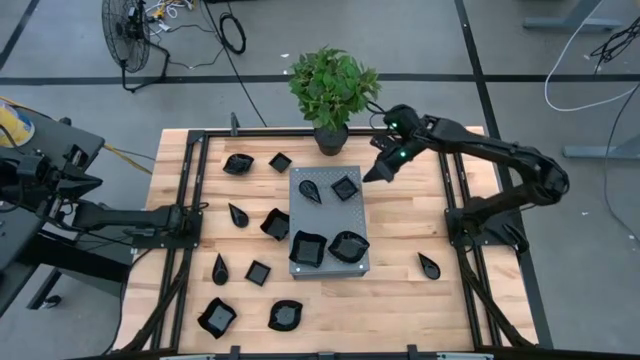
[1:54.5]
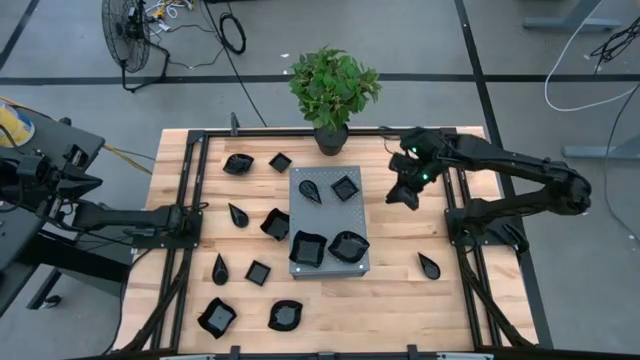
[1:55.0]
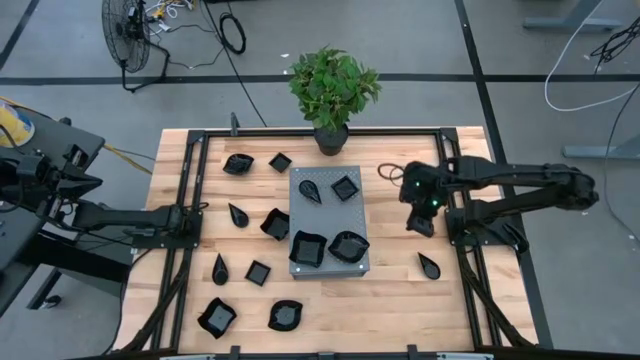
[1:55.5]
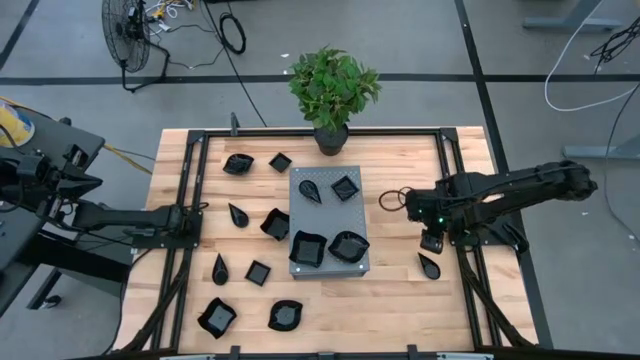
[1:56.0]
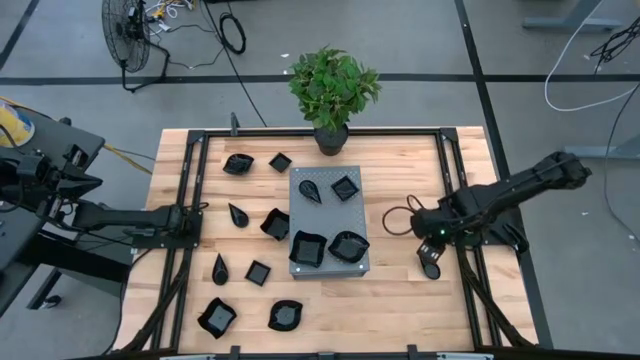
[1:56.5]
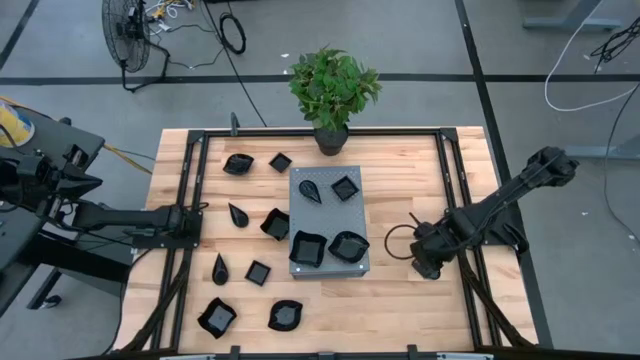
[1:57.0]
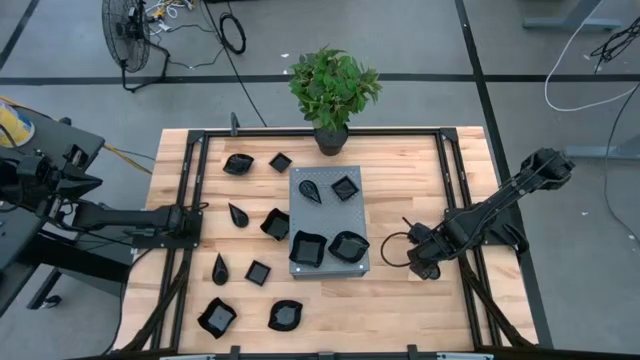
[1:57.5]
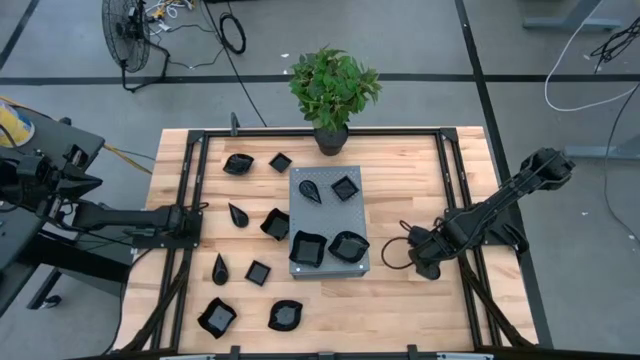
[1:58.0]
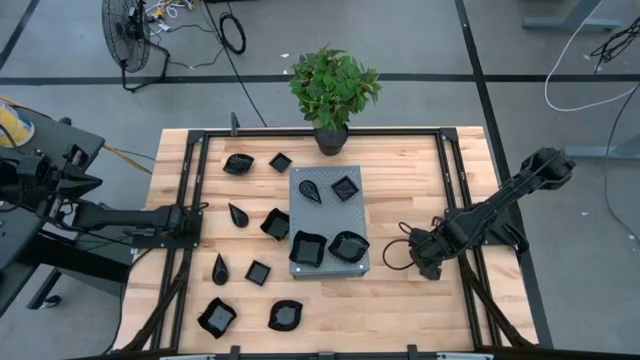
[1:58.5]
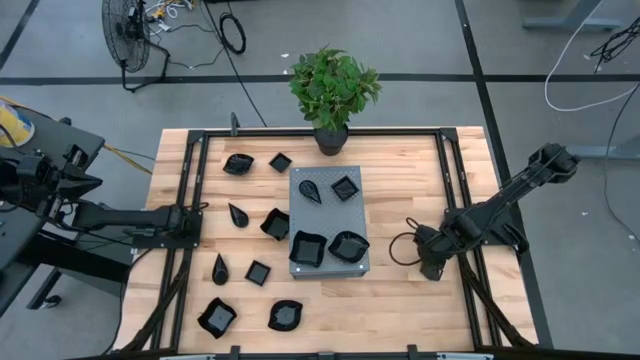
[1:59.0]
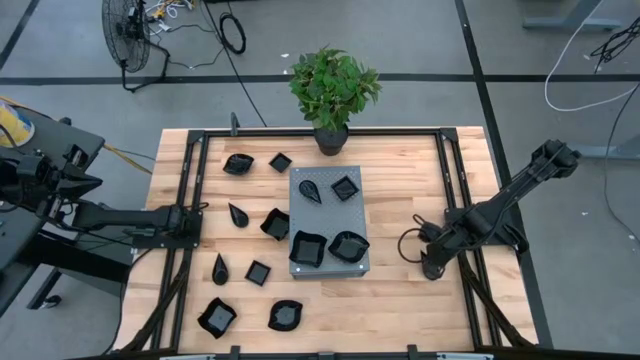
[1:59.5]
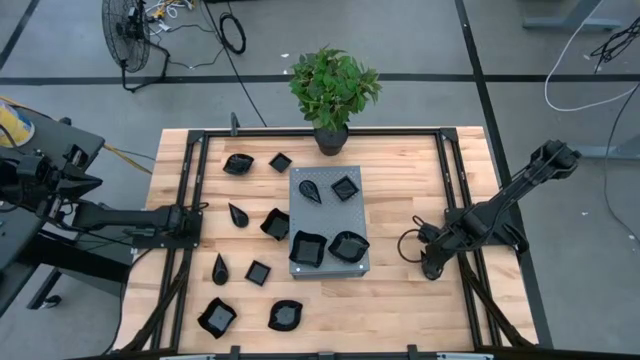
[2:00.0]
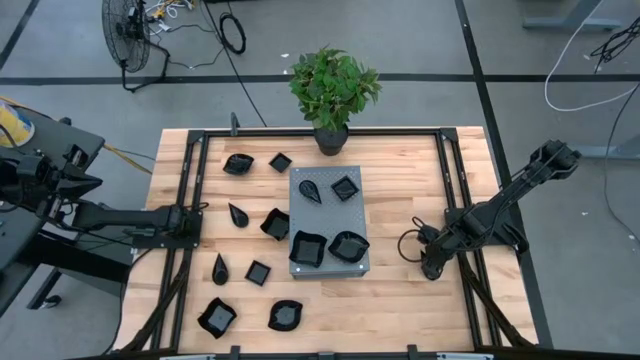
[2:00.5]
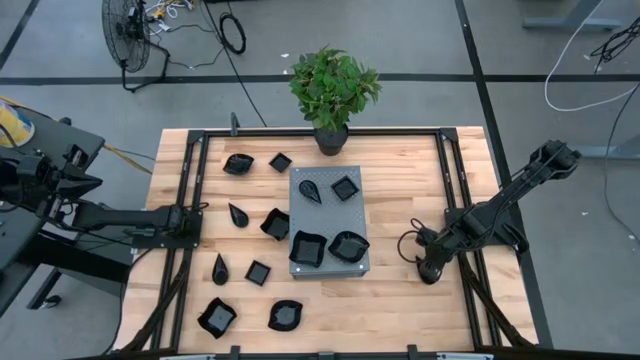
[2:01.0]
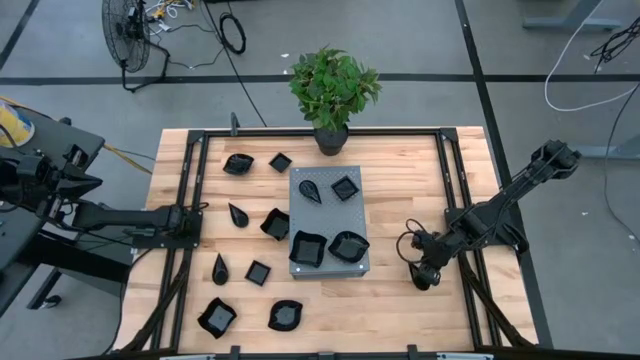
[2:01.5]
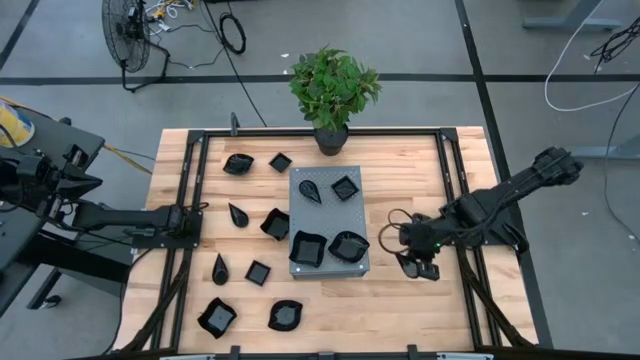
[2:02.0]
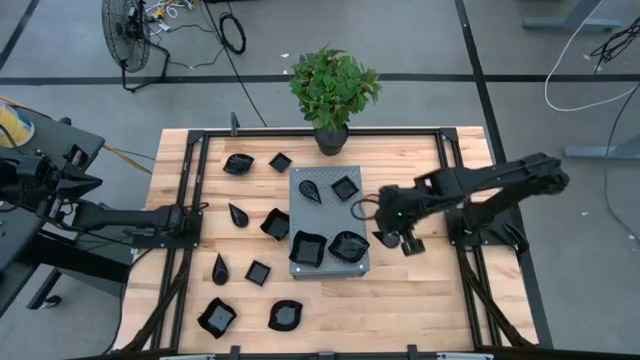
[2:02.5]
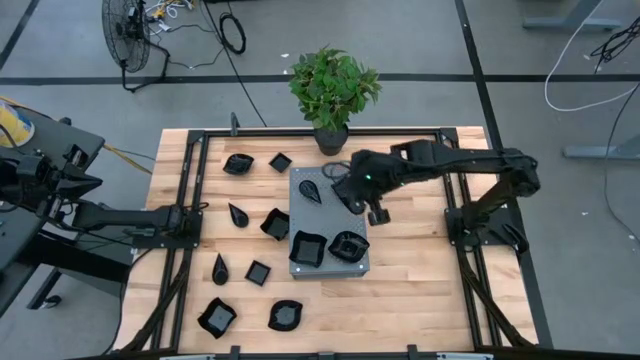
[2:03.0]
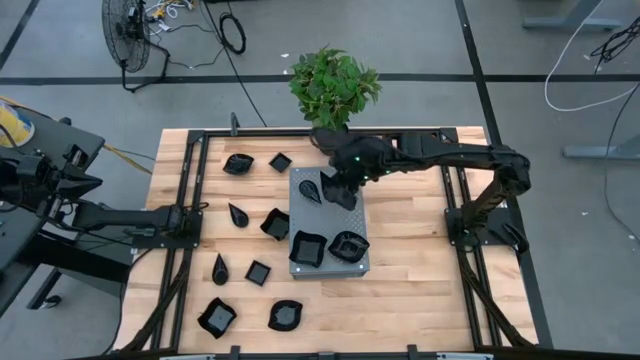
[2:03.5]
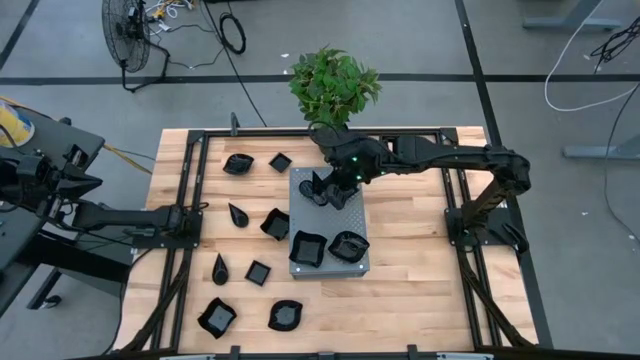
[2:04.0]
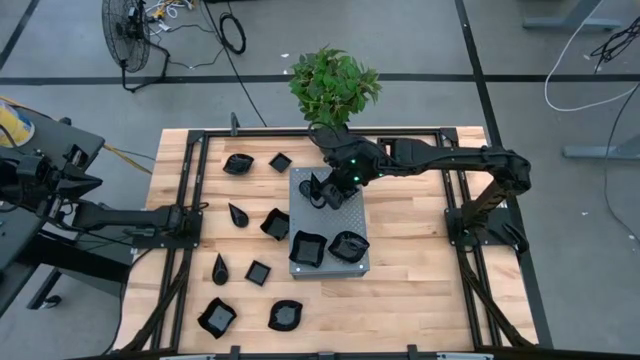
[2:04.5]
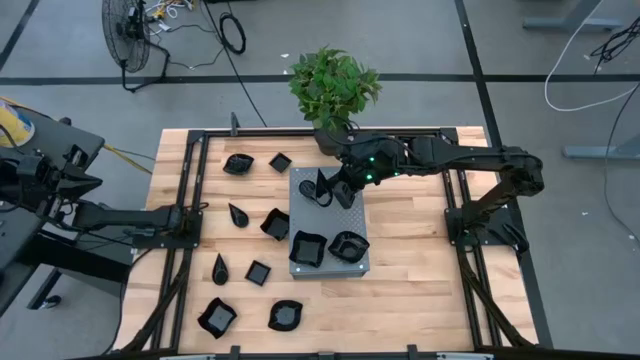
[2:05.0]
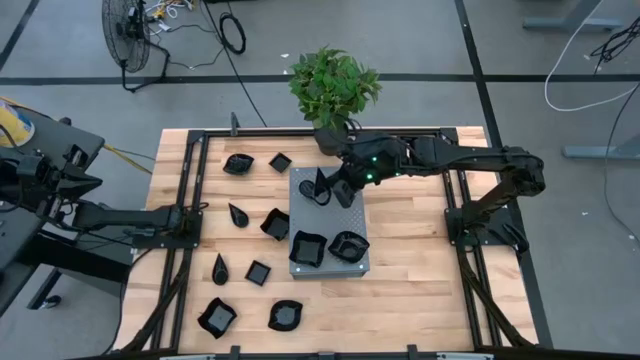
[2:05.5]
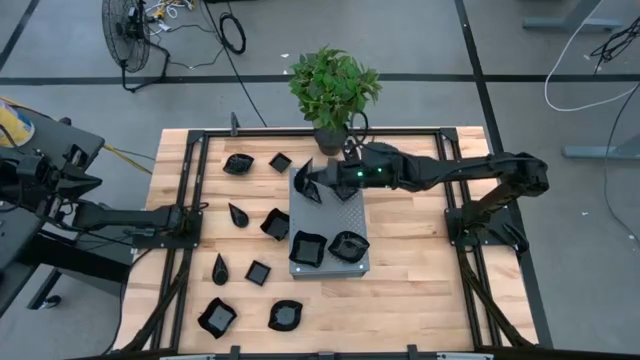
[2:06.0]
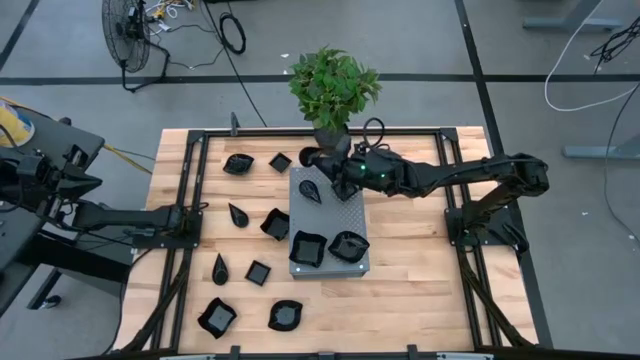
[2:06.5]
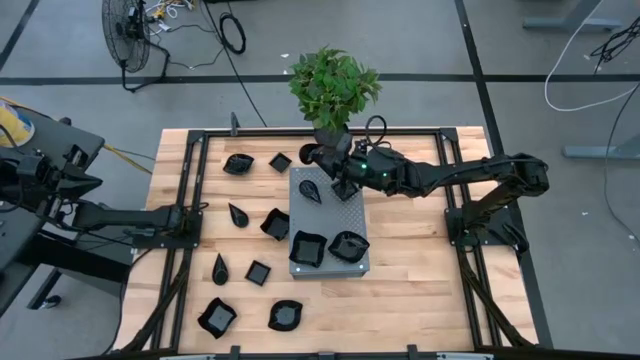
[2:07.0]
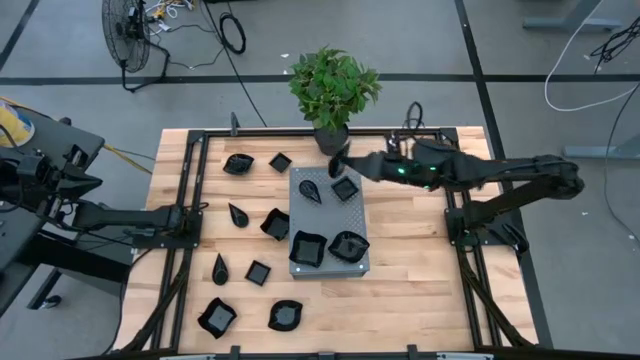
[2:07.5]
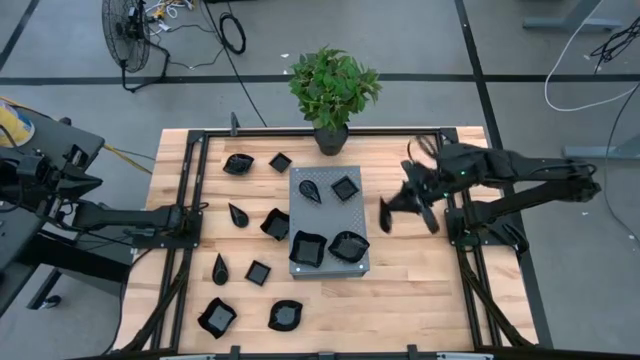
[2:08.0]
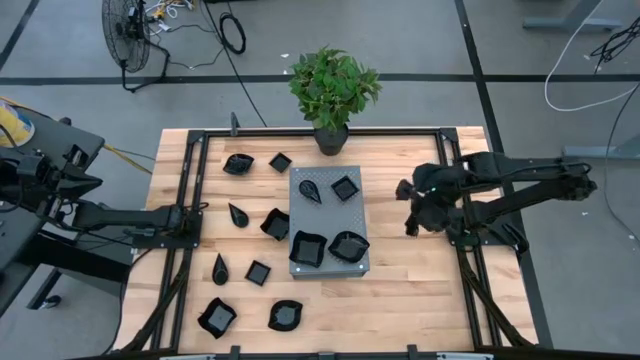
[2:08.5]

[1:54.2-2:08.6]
Task: Pick & Place Mini shaped plates
Stack the black bowl on top of the black bowl on the shelf

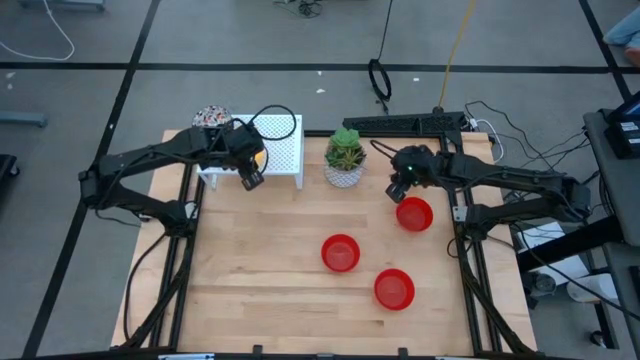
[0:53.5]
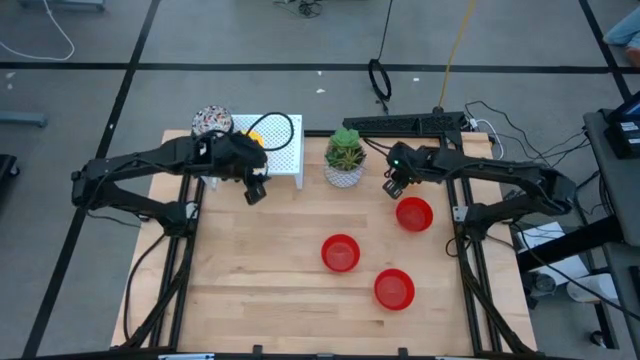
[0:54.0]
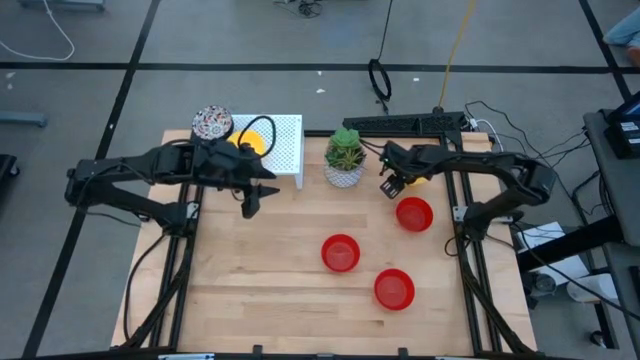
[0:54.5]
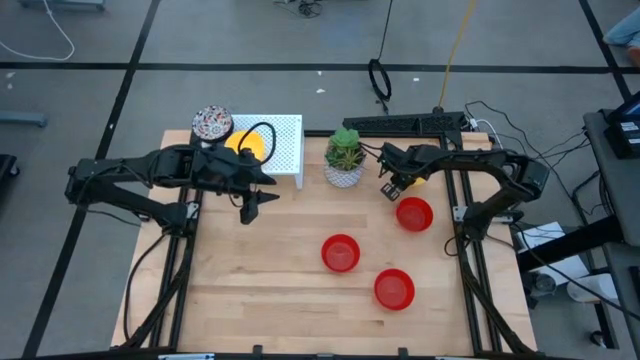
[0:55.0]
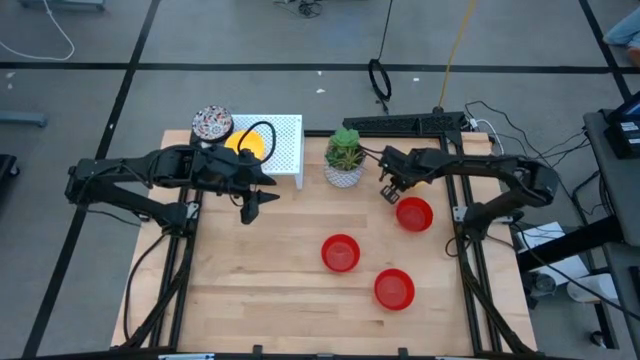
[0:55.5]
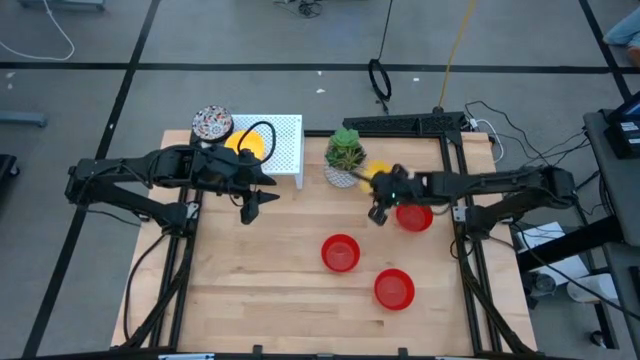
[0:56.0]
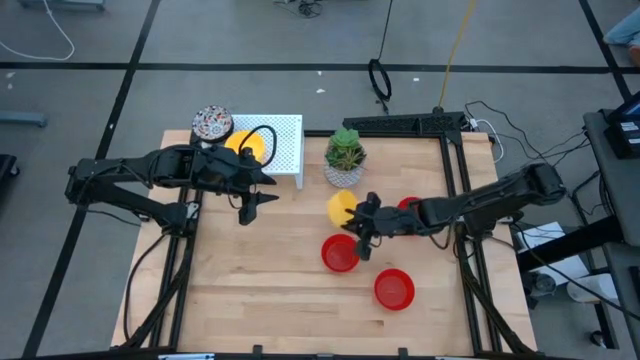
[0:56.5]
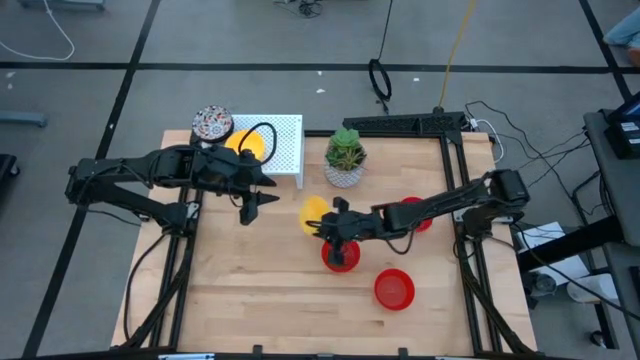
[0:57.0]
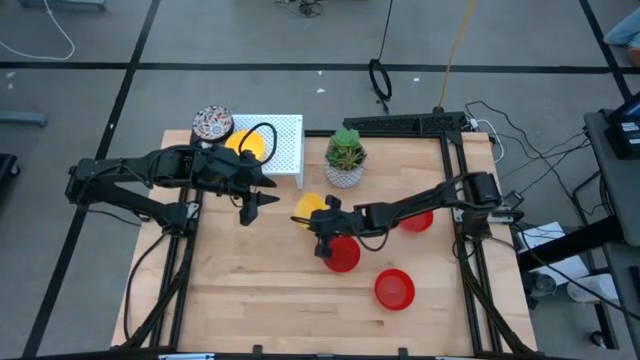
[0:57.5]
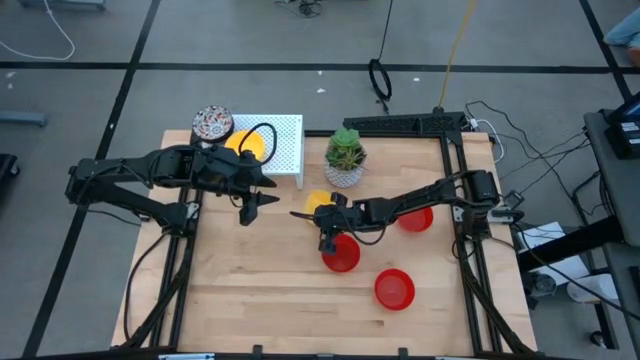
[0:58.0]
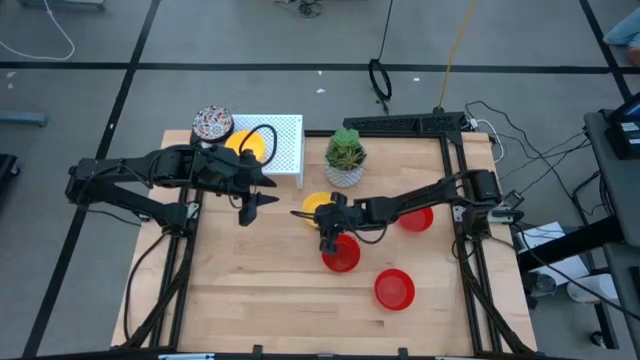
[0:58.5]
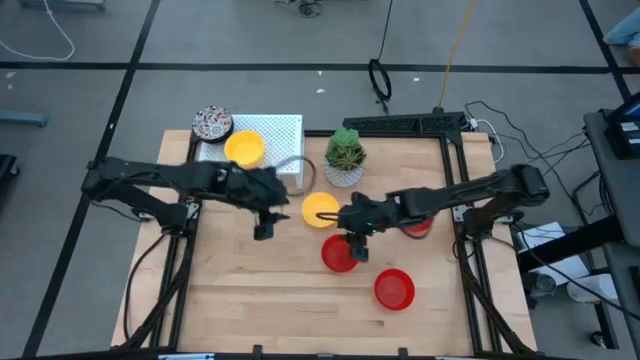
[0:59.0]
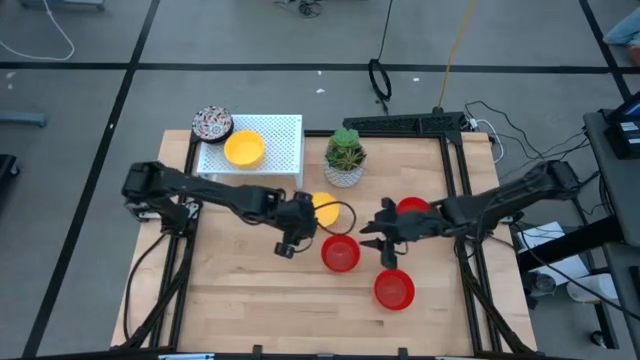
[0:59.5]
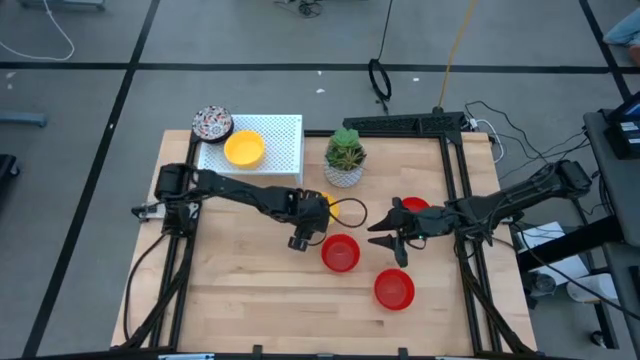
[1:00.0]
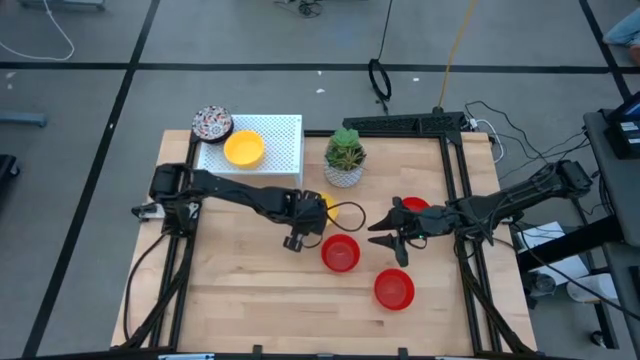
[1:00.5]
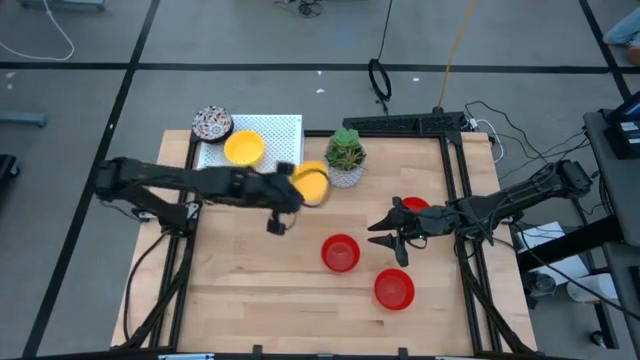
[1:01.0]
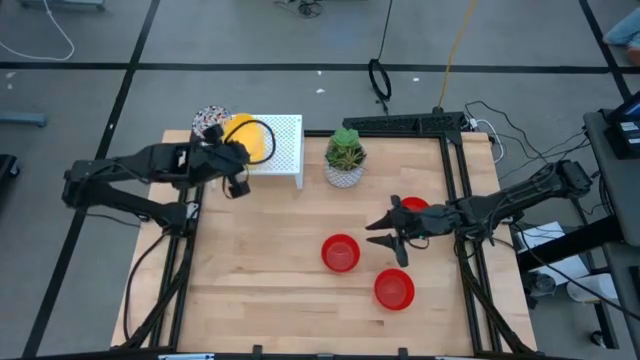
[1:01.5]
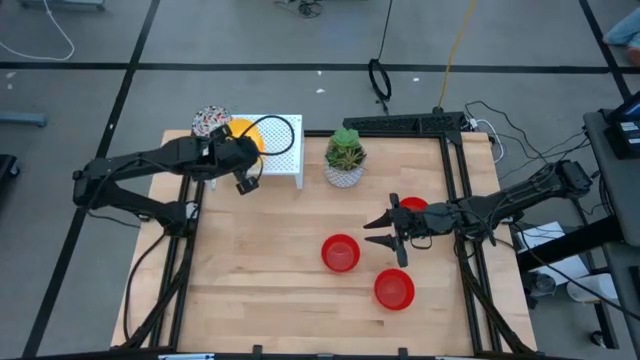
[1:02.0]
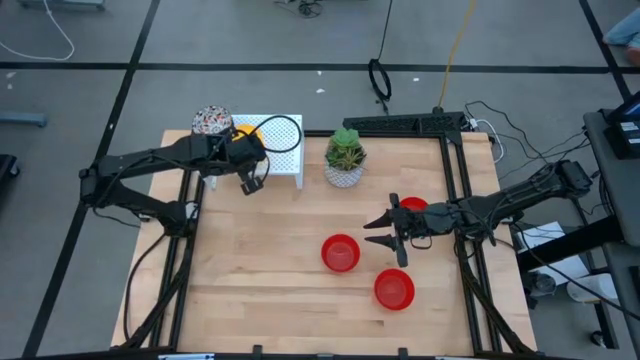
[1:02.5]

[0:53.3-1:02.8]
Task: Pick & Place Mini bowls
Stack the yellow bowl on top of the yellow bowl on the shelf
